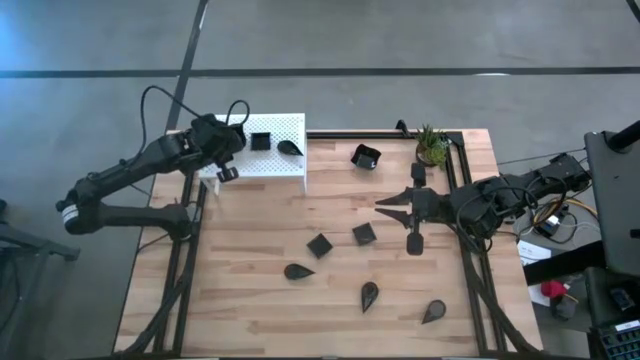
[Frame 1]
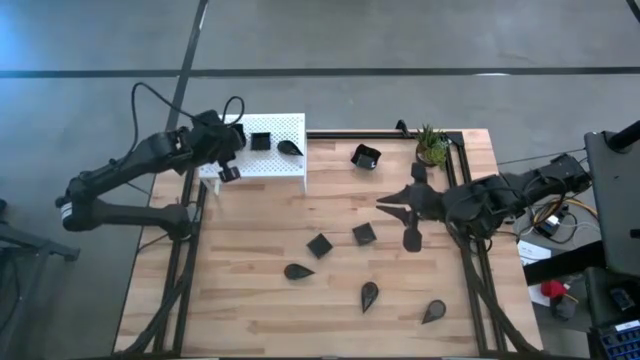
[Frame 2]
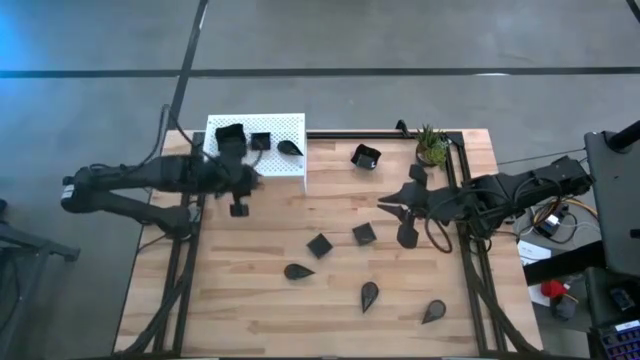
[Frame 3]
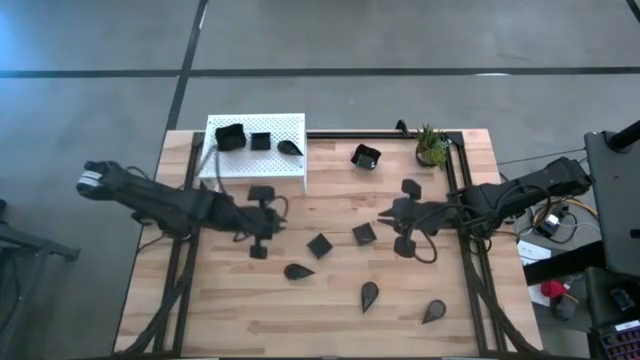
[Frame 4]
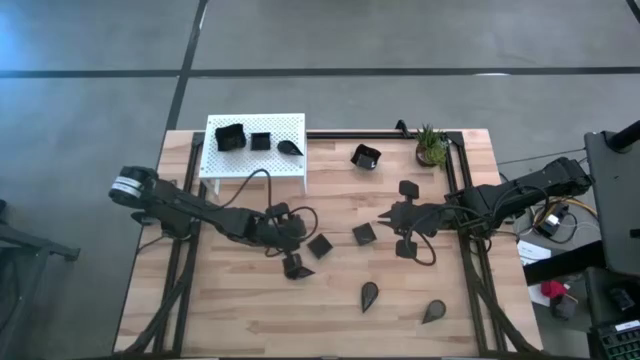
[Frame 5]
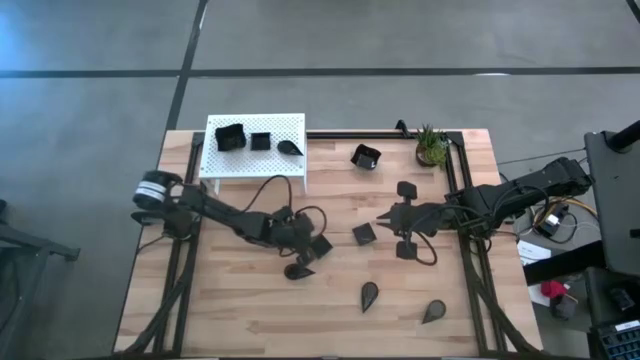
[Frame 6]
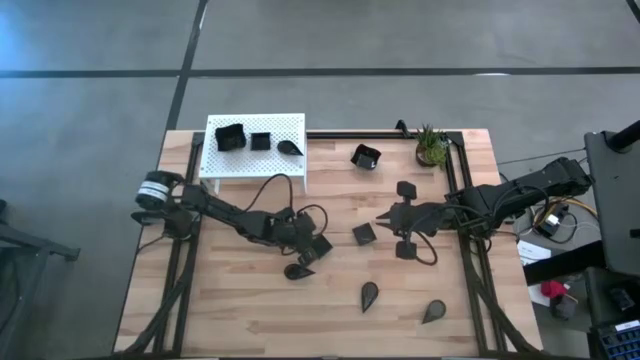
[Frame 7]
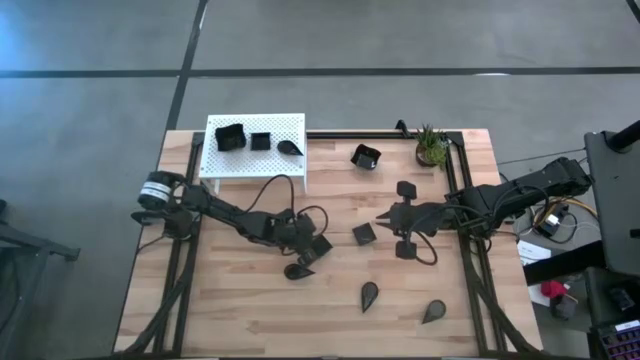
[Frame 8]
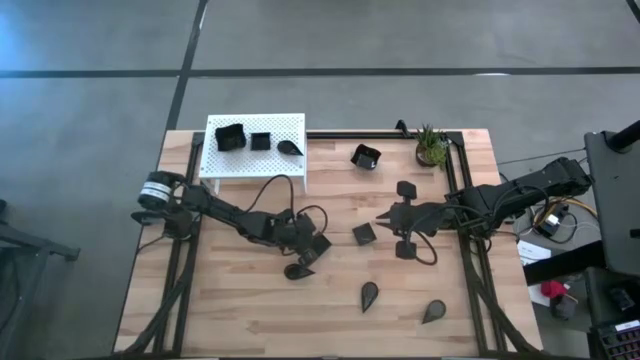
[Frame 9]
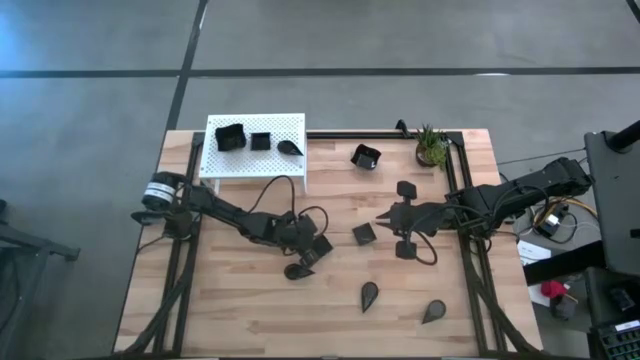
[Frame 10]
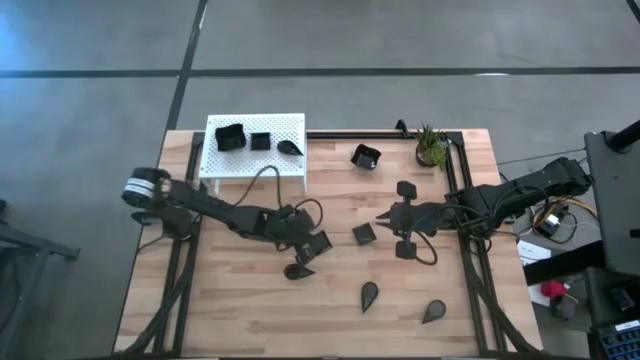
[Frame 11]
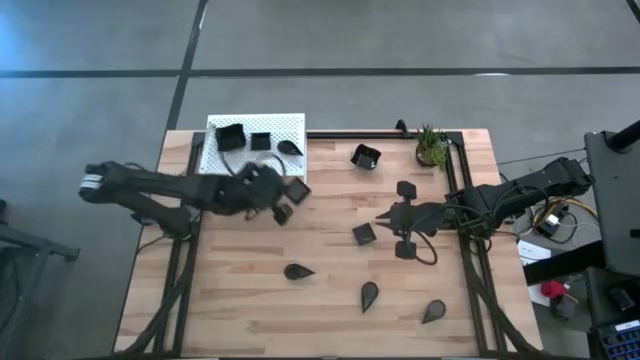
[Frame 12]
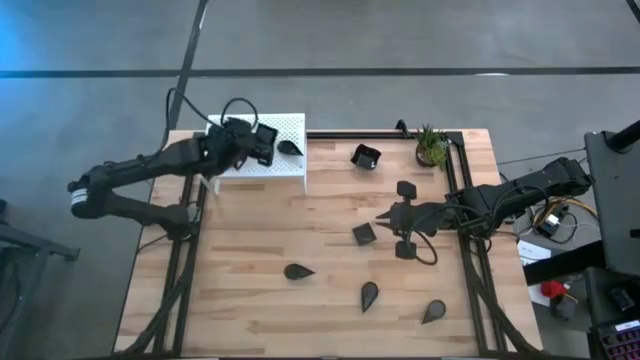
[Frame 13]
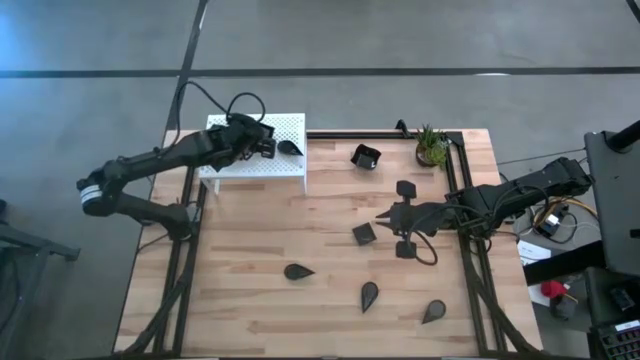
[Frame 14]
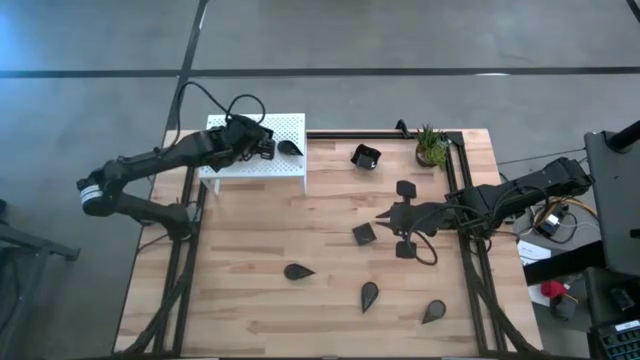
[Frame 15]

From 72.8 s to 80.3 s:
Task: Pick & Place Mini shaped plates
Stack the square plate on top of the other square plate on the shelf

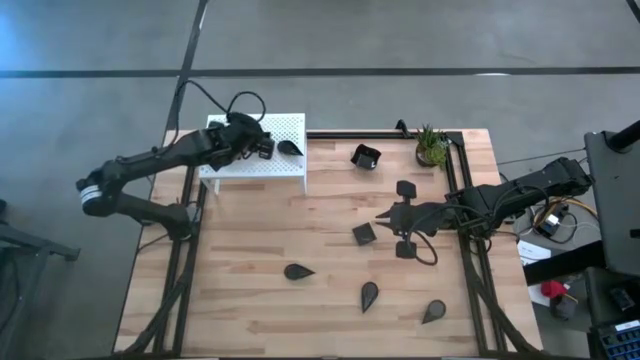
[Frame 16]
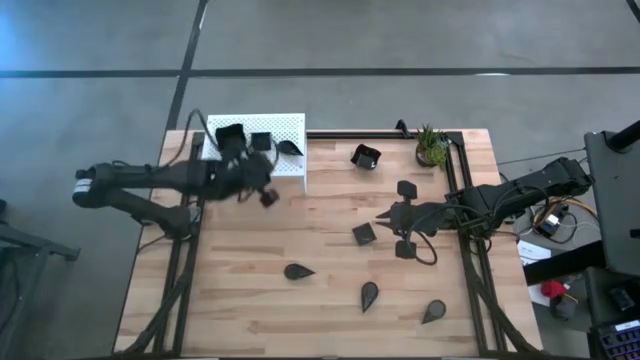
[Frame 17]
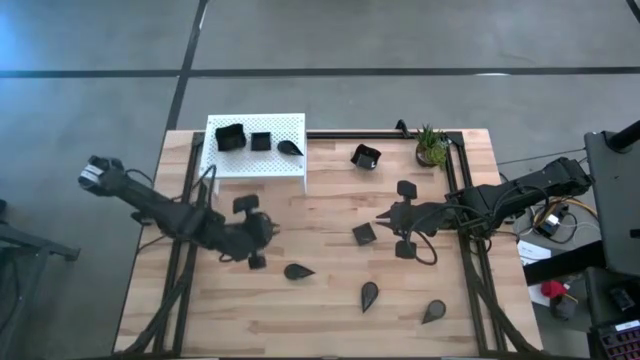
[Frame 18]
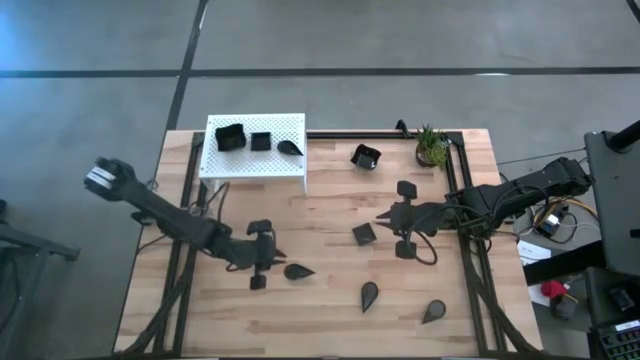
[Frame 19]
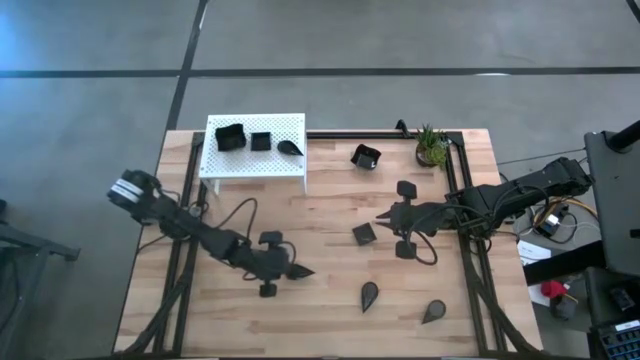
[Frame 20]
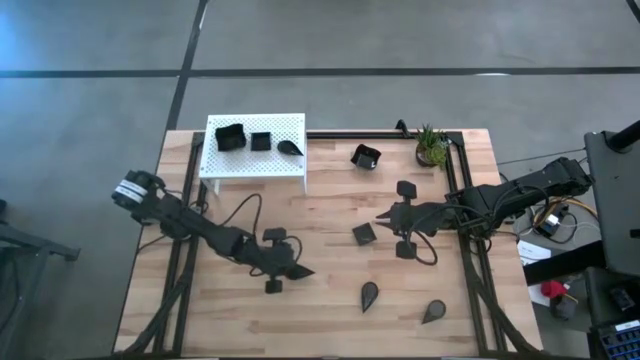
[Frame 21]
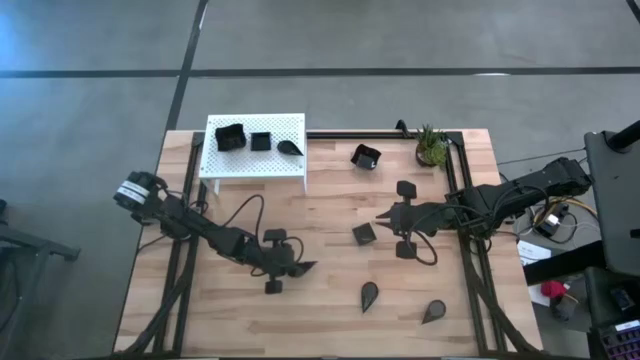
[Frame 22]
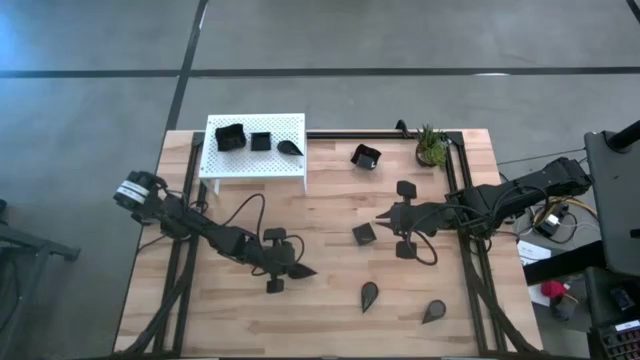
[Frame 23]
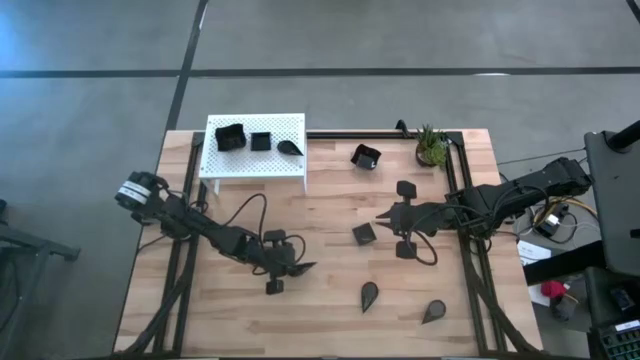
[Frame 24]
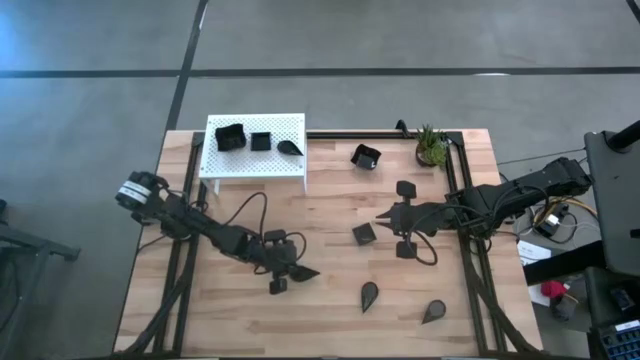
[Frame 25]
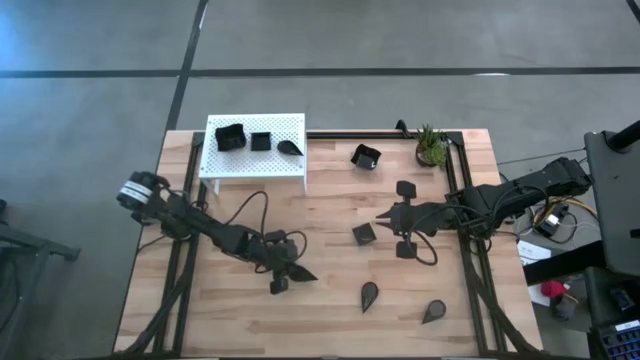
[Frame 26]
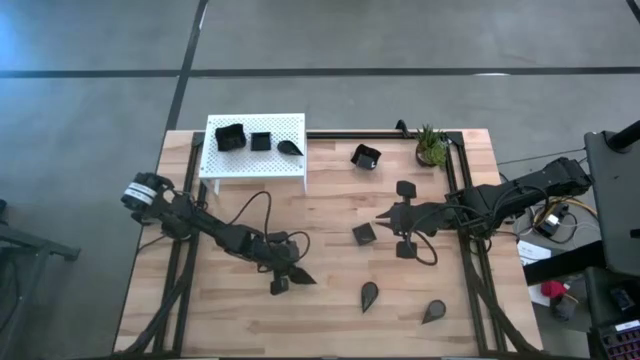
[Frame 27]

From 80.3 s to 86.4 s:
Stack the drop shaped plate on top of the other drop shaped plate on the shelf

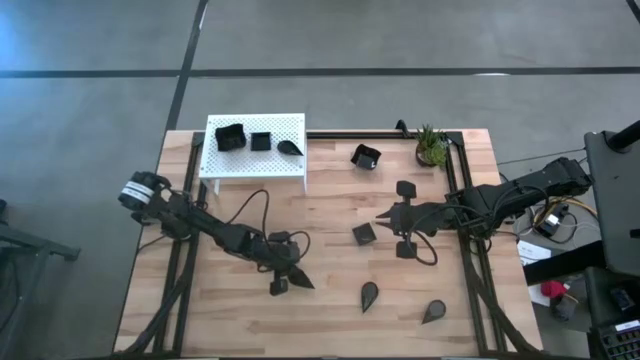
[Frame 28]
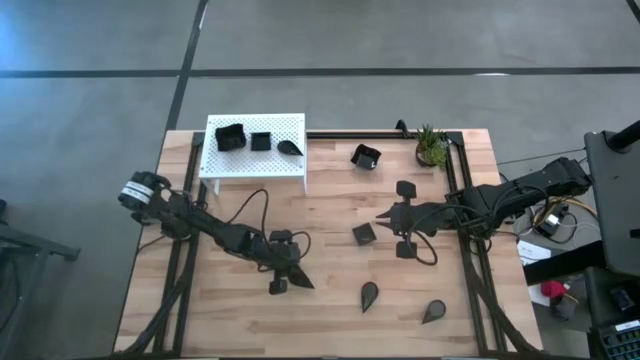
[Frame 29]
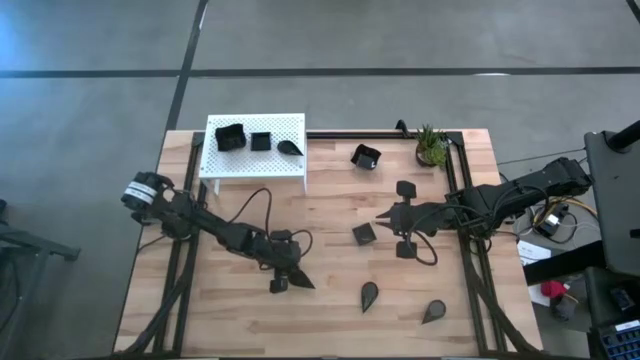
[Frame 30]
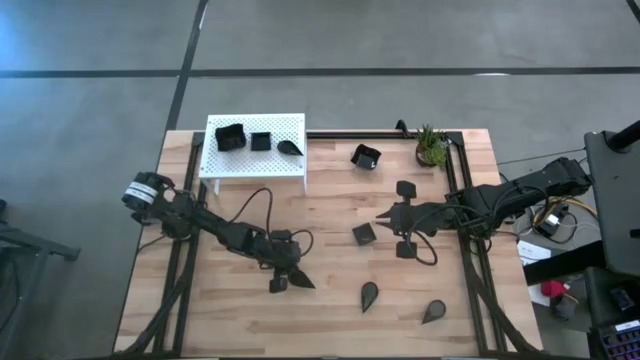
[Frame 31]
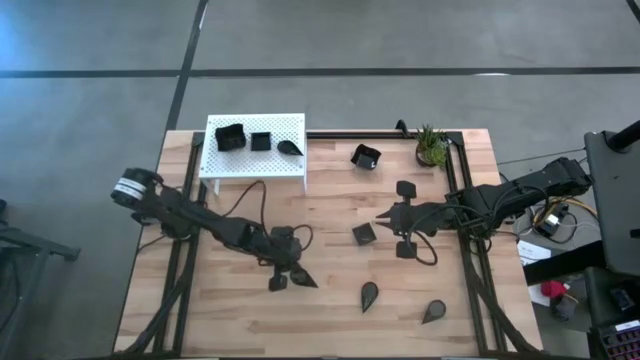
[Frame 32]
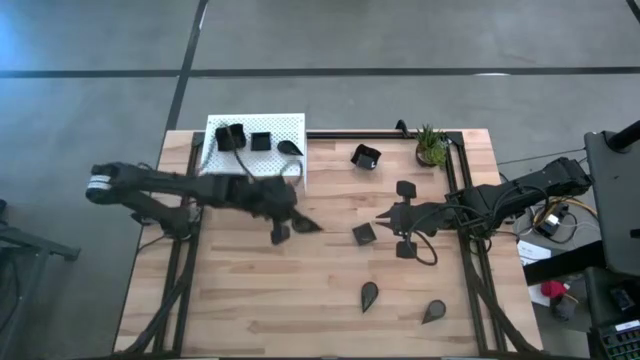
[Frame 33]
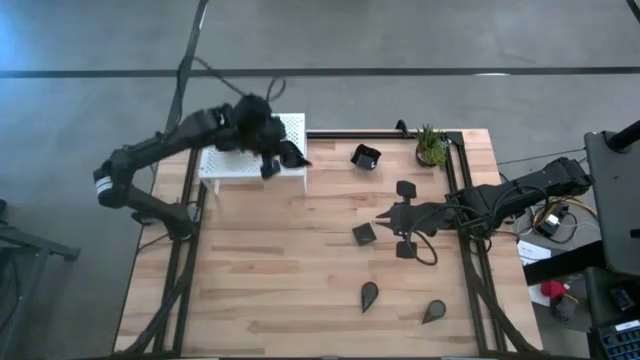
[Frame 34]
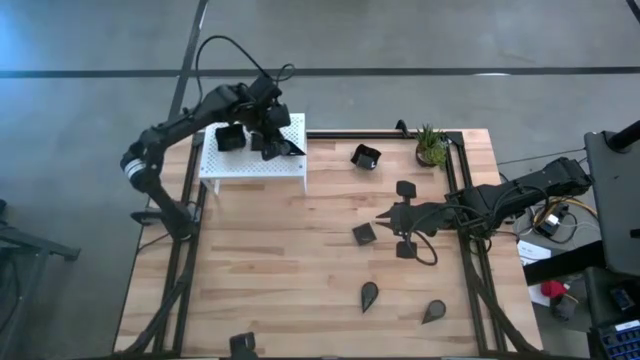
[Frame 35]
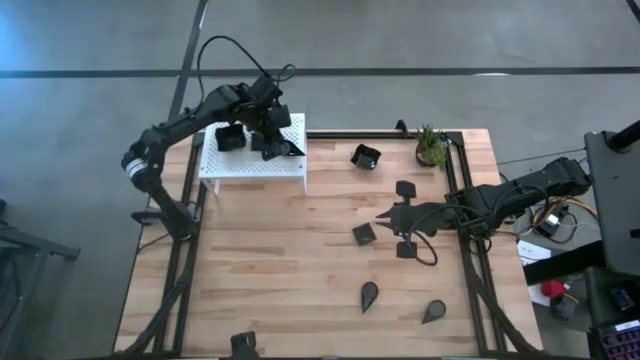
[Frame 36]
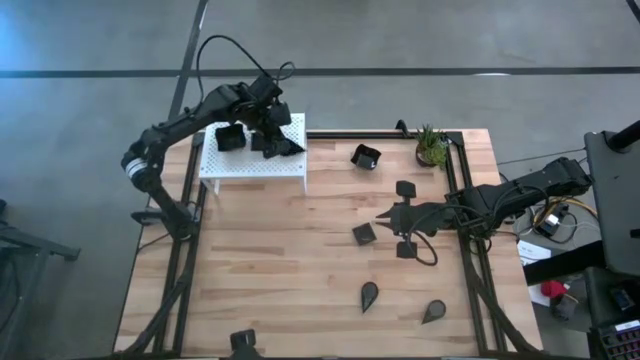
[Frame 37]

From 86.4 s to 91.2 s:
Stack the drop shaped plate on top of the other drop shaped plate on the shelf
